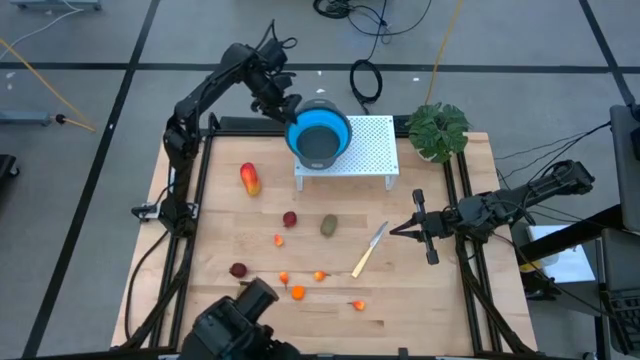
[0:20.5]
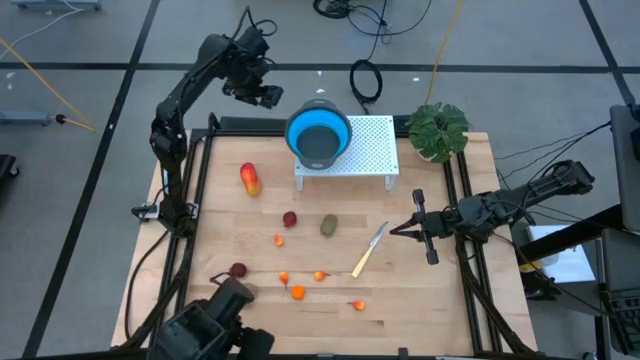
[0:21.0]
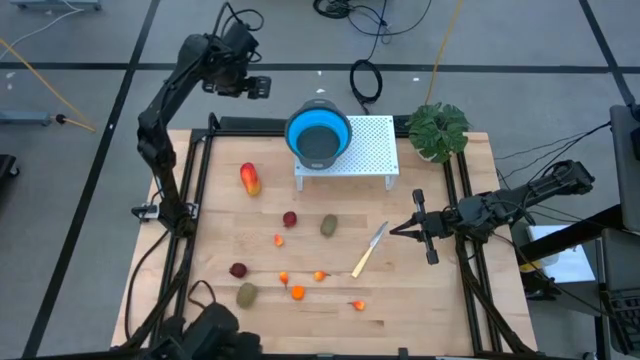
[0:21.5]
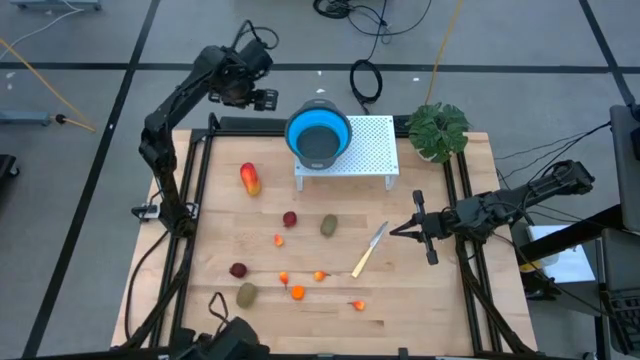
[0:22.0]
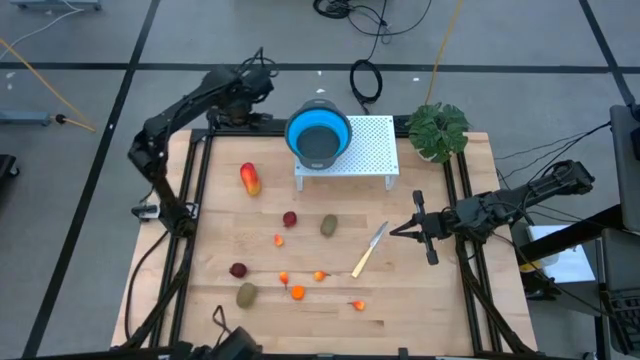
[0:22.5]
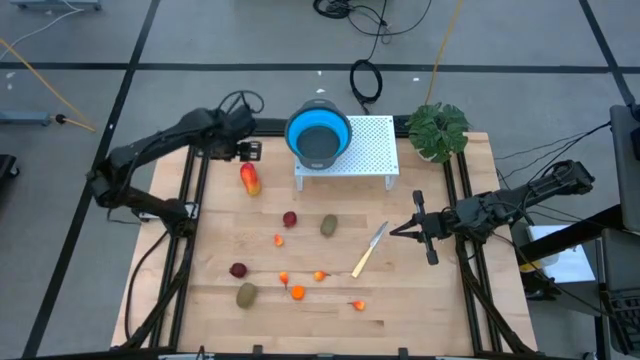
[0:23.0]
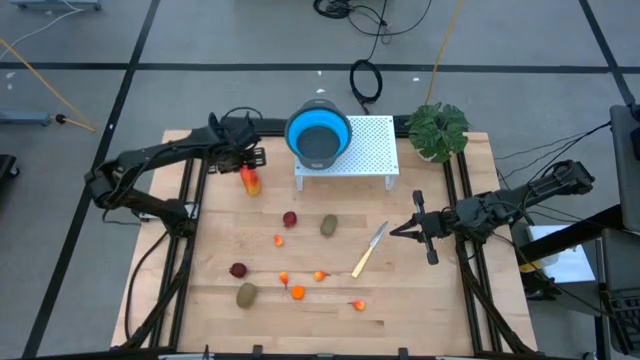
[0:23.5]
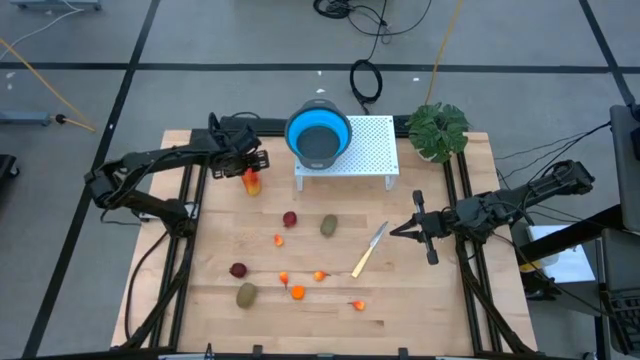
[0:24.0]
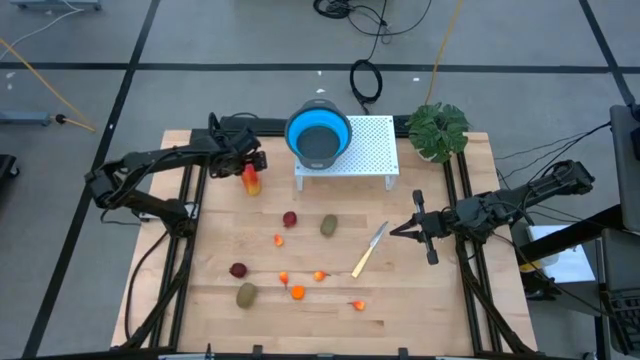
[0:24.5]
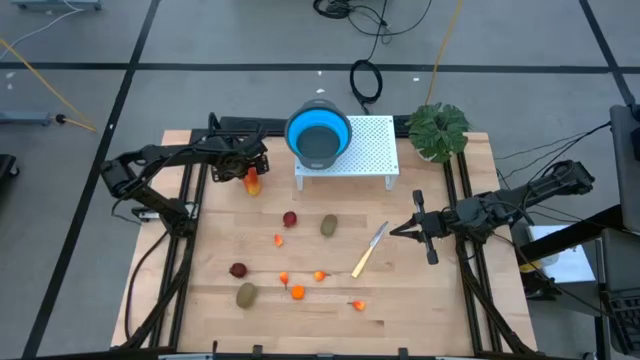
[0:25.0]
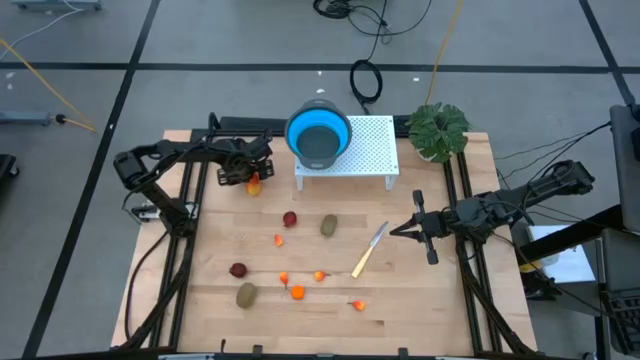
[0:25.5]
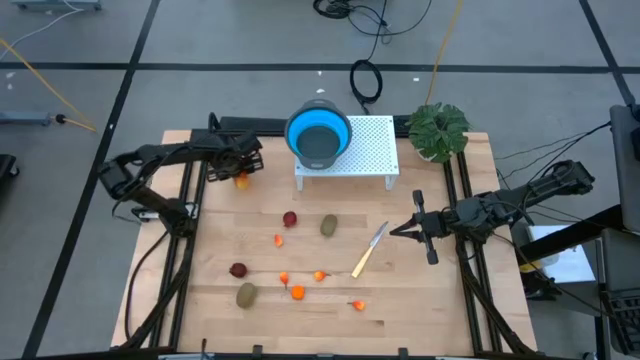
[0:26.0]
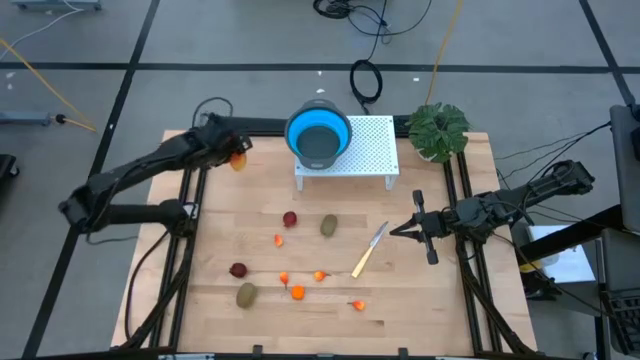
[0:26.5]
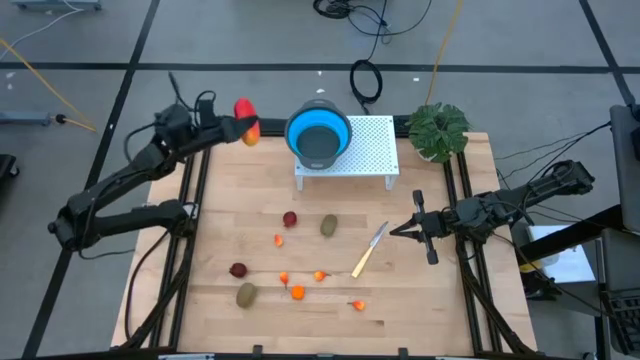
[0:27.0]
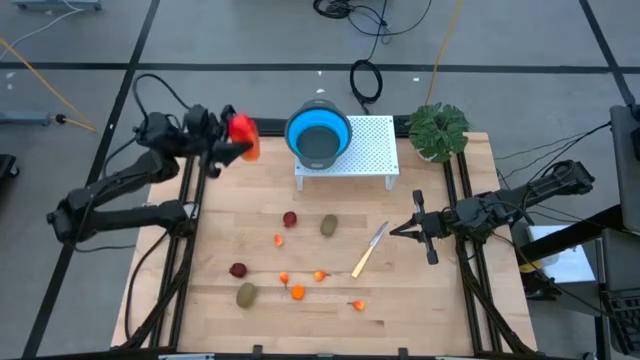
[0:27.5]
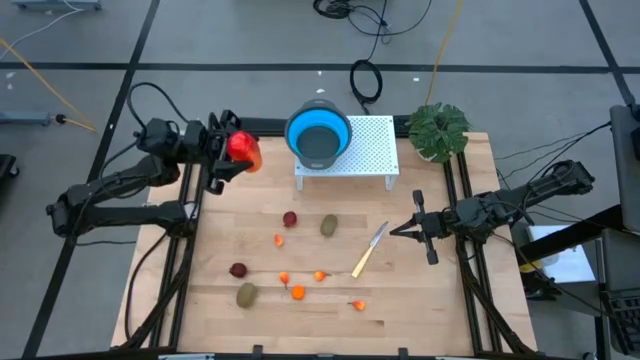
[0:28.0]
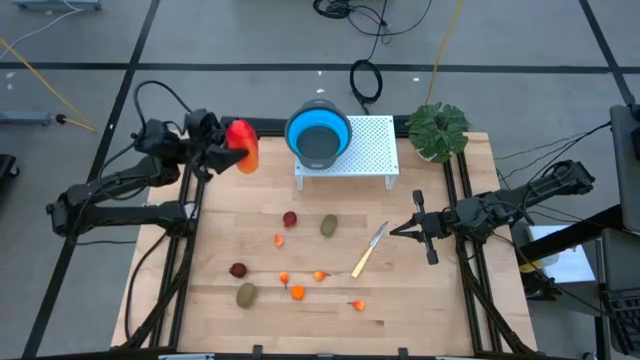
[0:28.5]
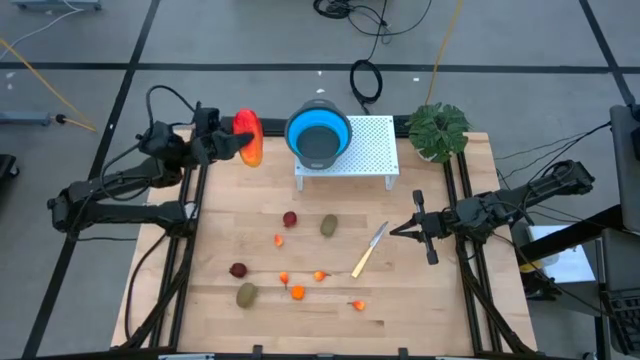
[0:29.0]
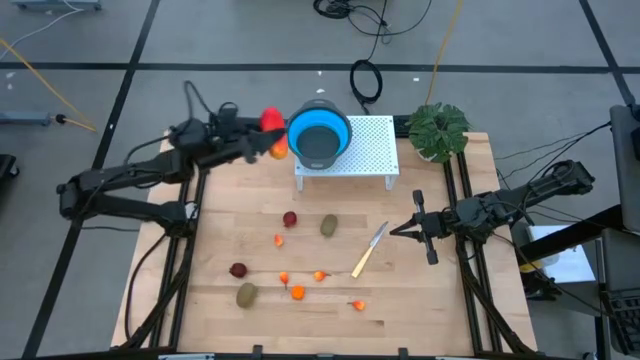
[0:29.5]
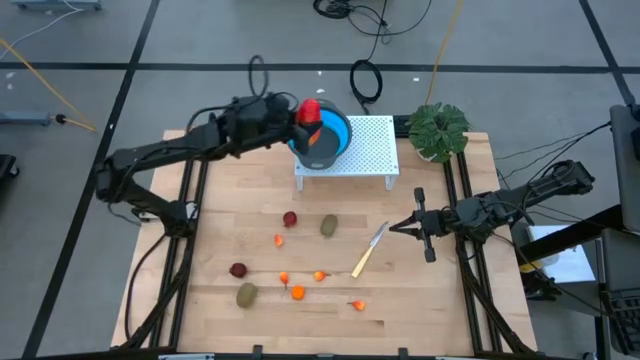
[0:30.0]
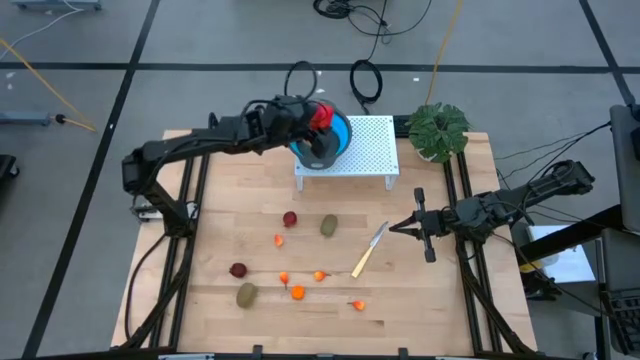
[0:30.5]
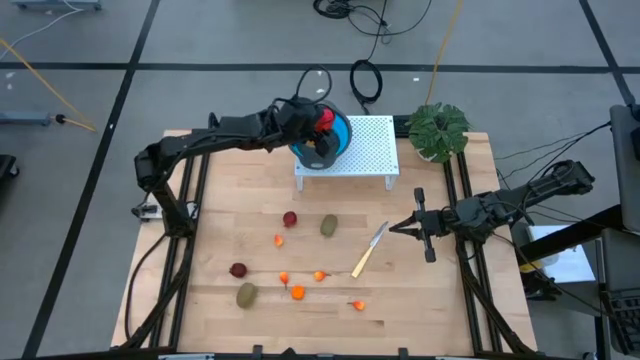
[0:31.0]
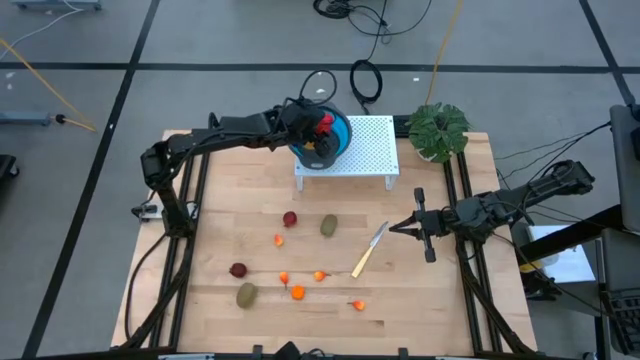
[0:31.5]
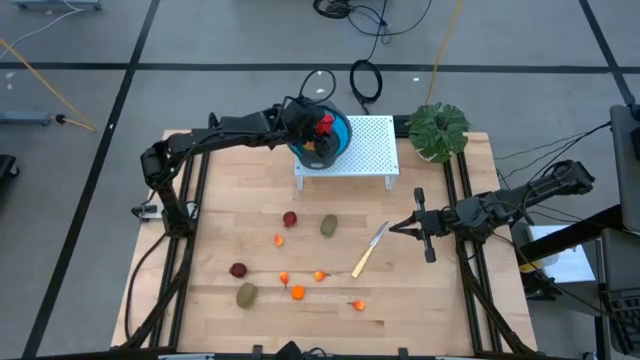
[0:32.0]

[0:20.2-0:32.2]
Task: Pick & Place Fruit
Put the red mango into the blue strainer bowl on the shelf

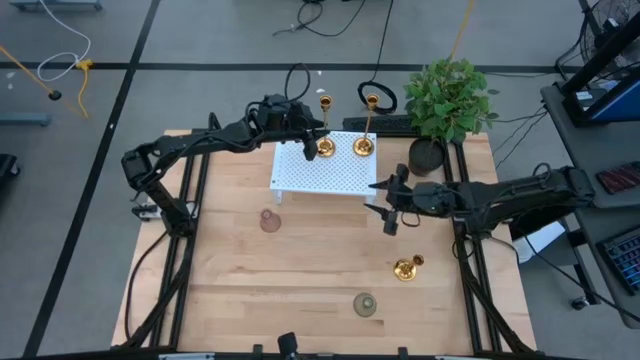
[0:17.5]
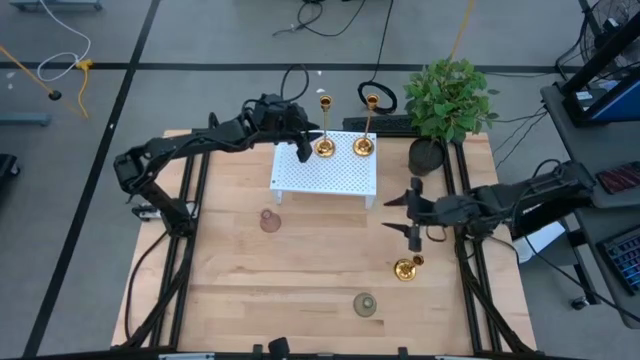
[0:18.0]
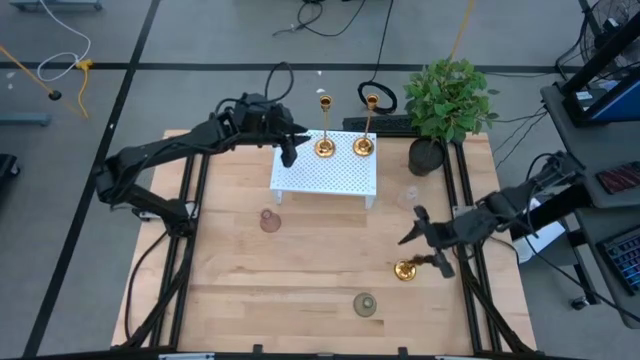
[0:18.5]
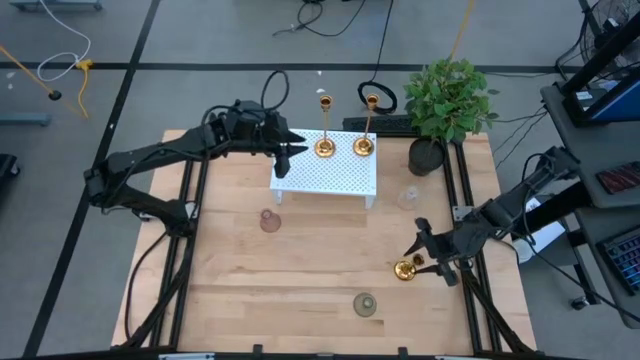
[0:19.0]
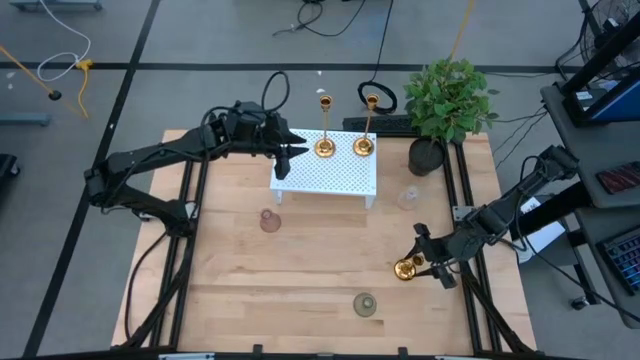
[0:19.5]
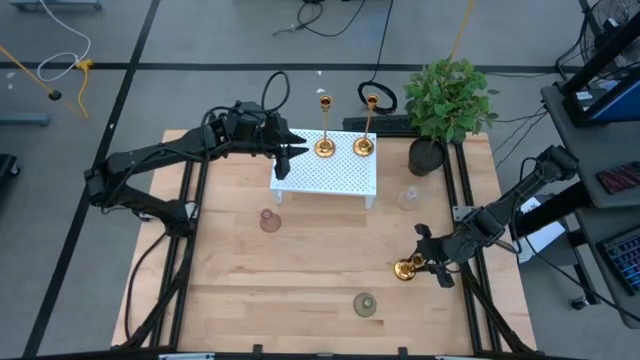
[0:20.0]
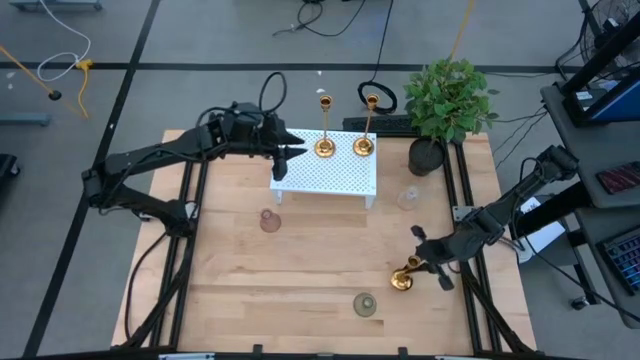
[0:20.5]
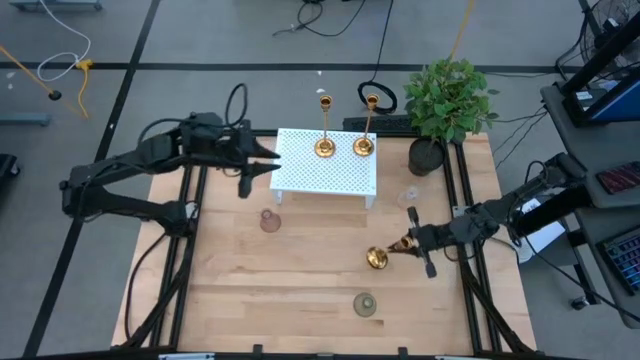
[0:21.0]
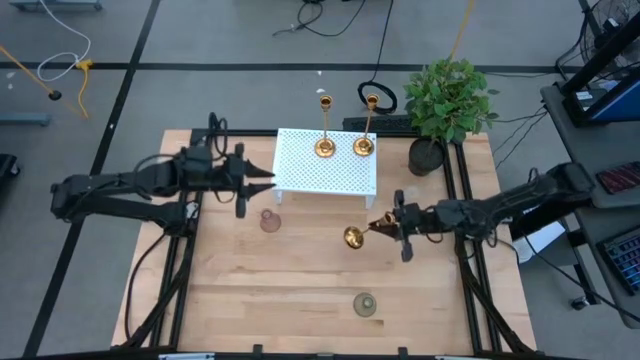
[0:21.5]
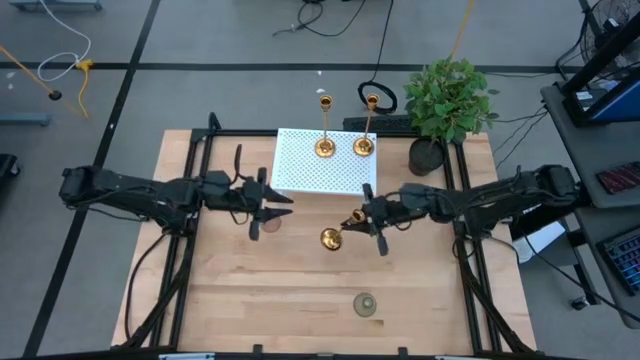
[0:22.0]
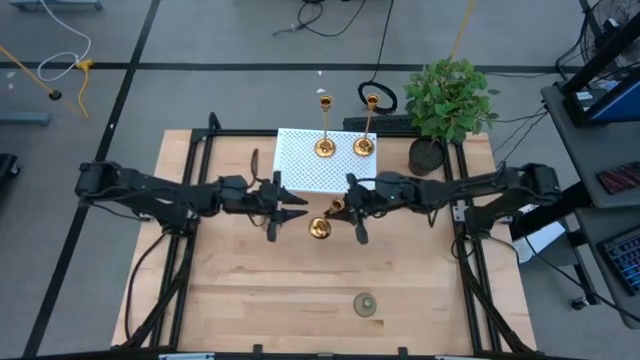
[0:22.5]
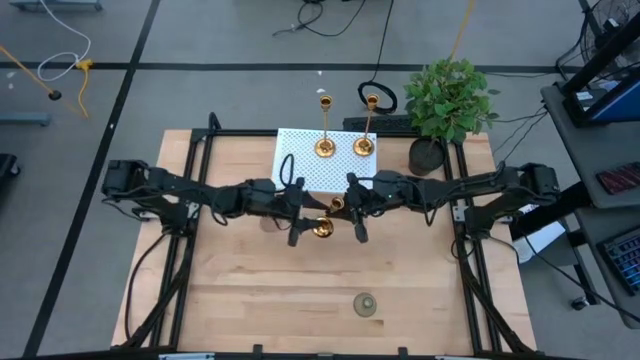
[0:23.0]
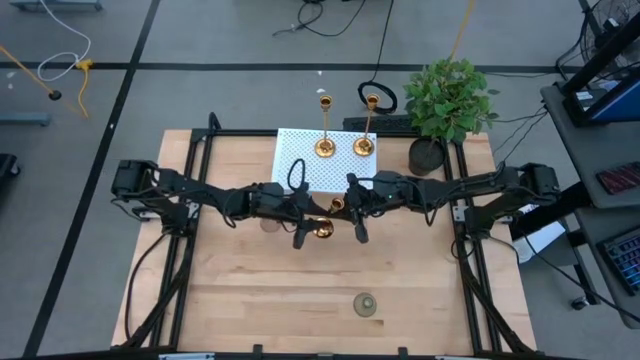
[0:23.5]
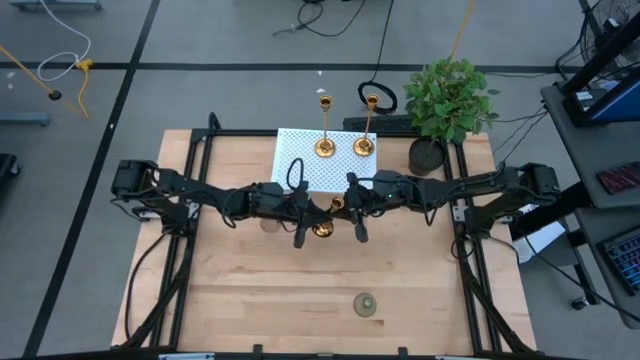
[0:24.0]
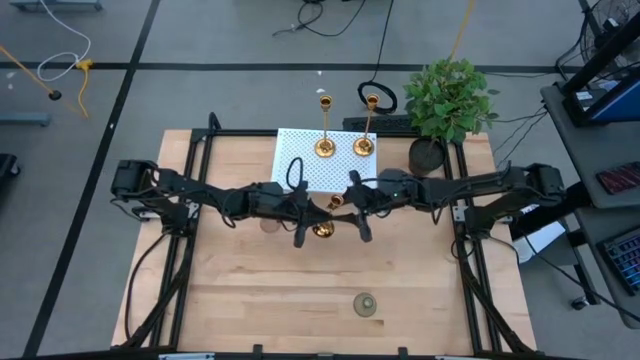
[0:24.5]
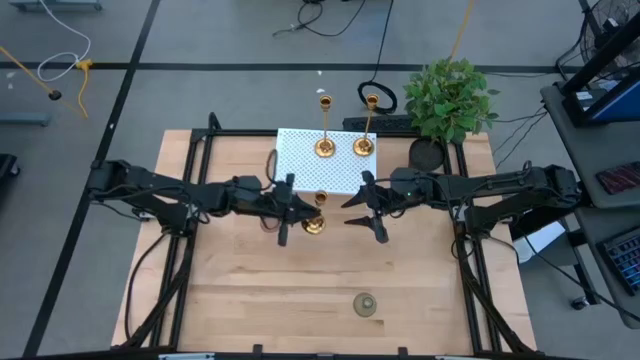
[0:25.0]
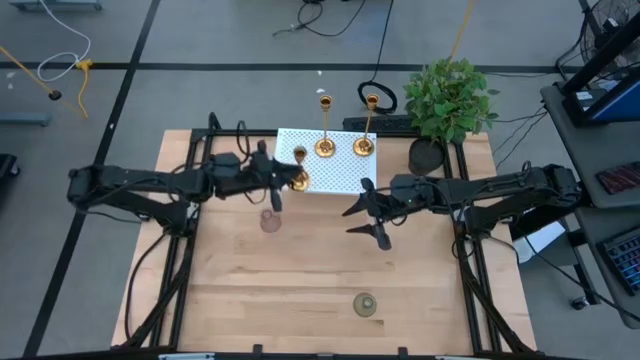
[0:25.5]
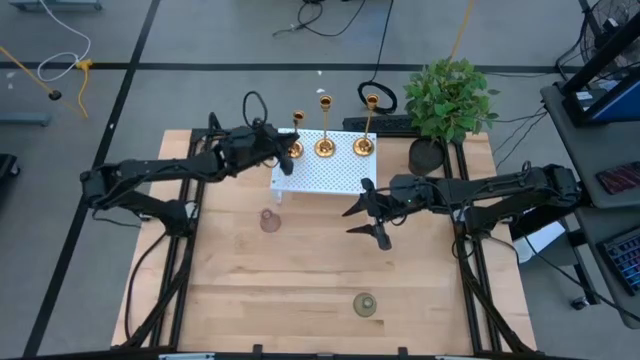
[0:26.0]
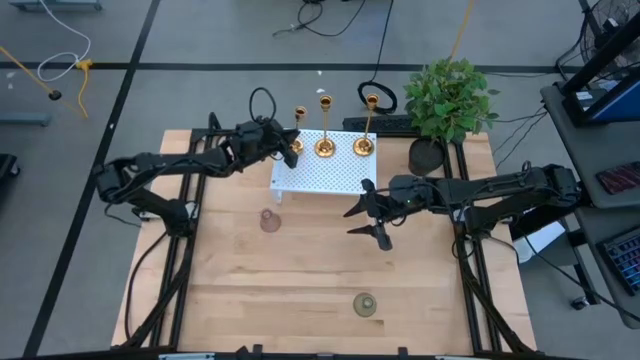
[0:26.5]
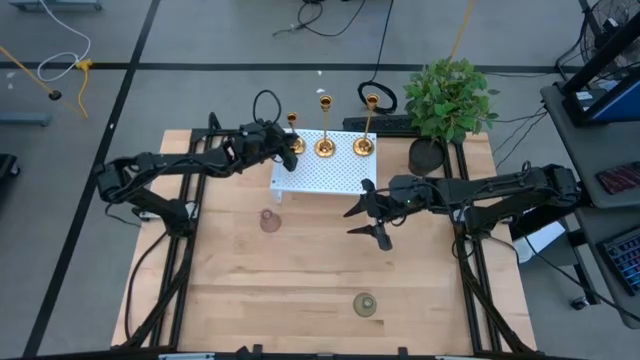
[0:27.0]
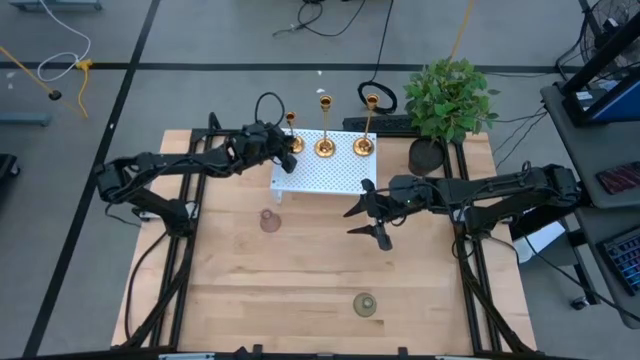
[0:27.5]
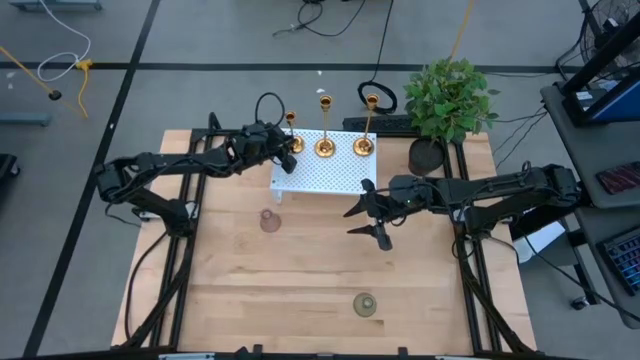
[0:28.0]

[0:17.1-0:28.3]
Task: Pick & Place candle stick holders
Put the short gold candle holder on the shelf
